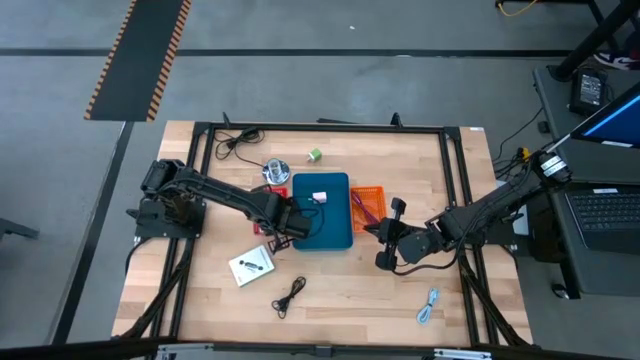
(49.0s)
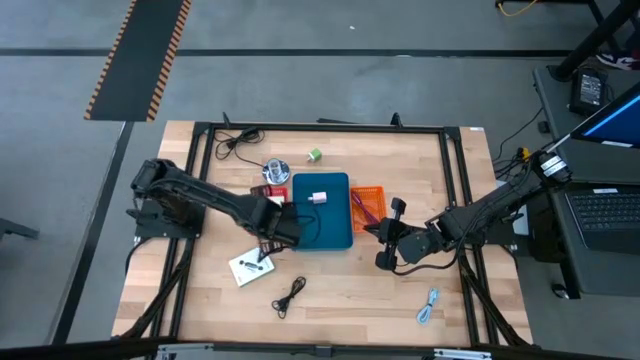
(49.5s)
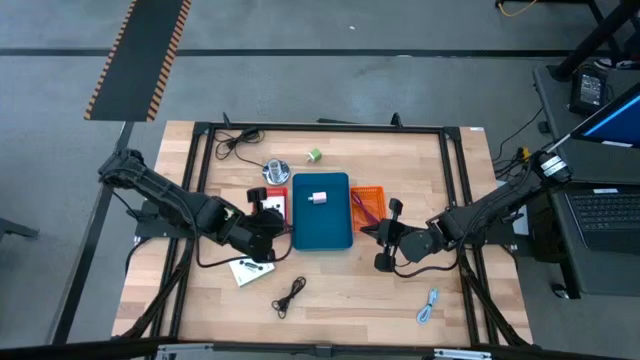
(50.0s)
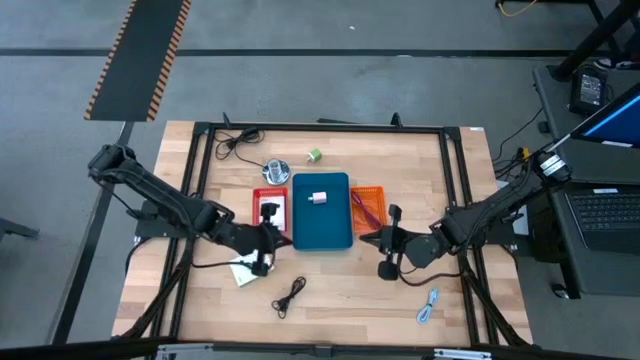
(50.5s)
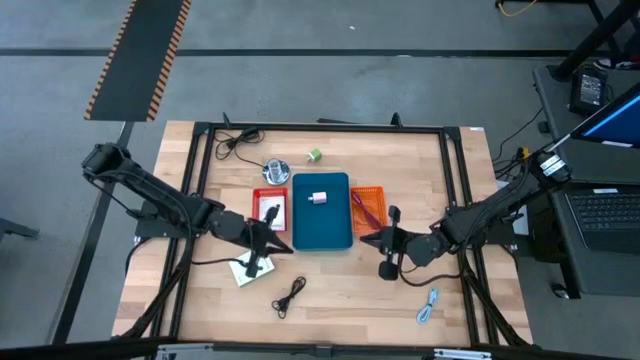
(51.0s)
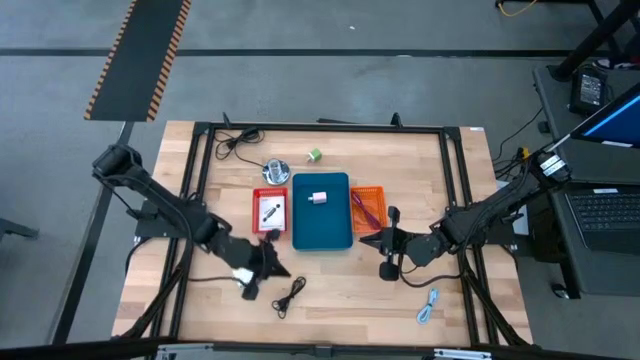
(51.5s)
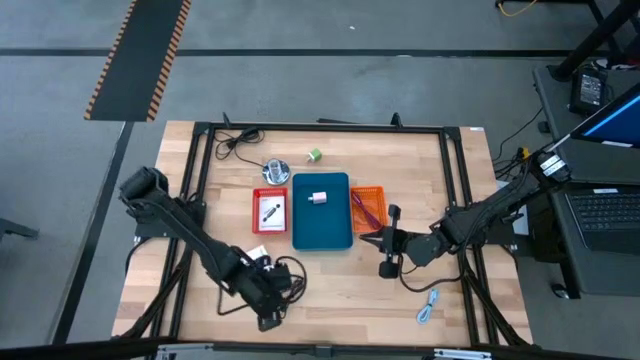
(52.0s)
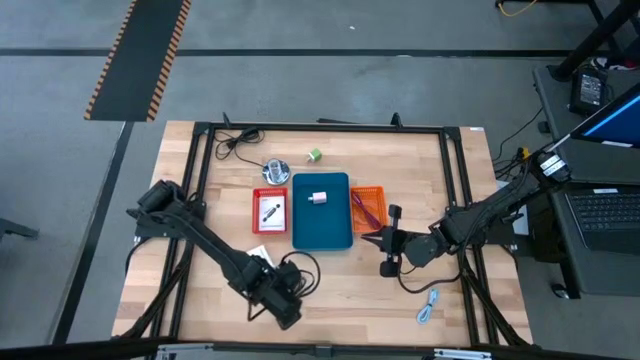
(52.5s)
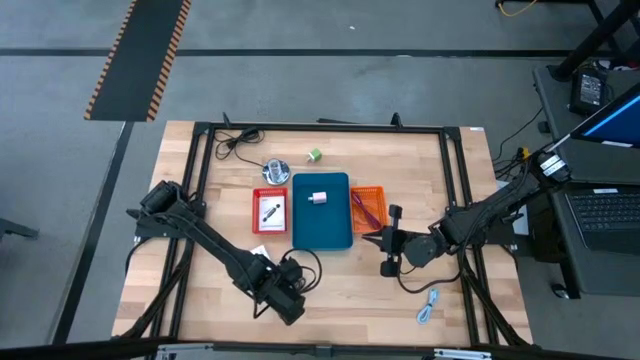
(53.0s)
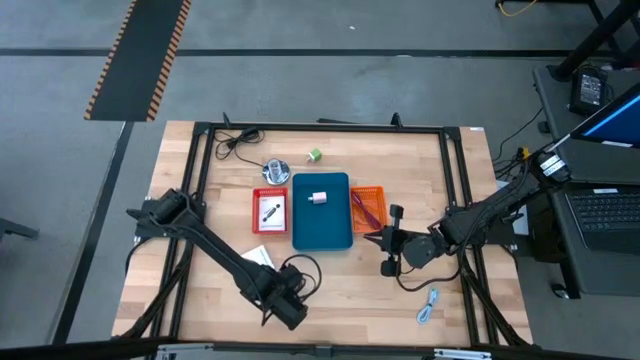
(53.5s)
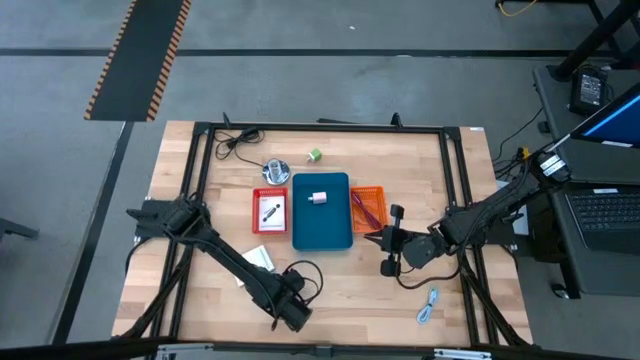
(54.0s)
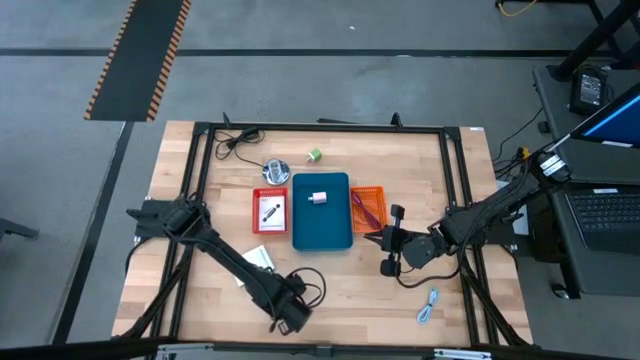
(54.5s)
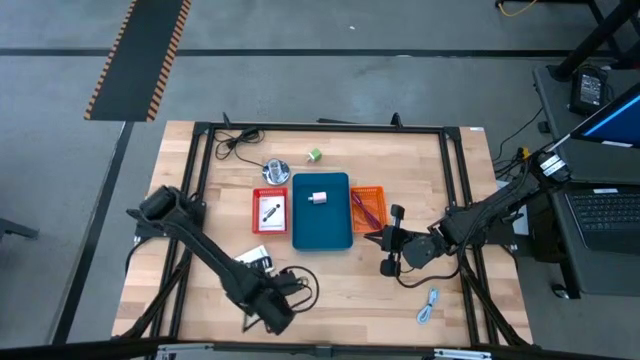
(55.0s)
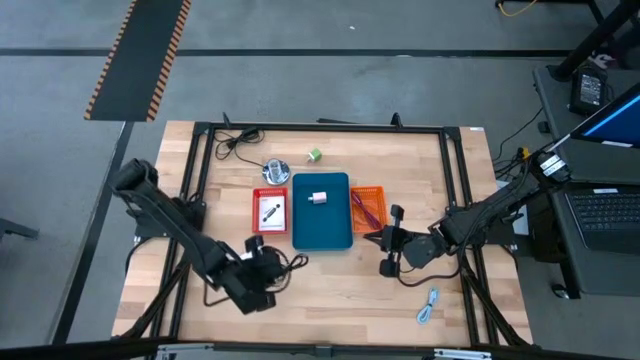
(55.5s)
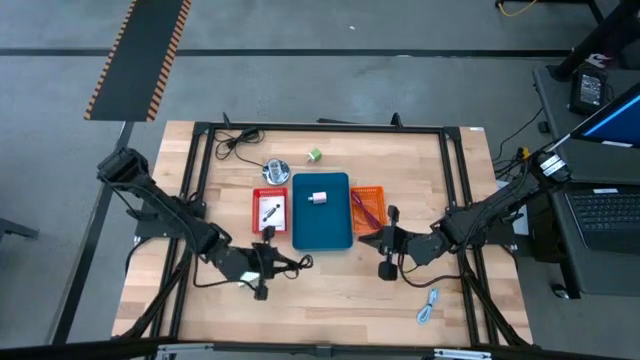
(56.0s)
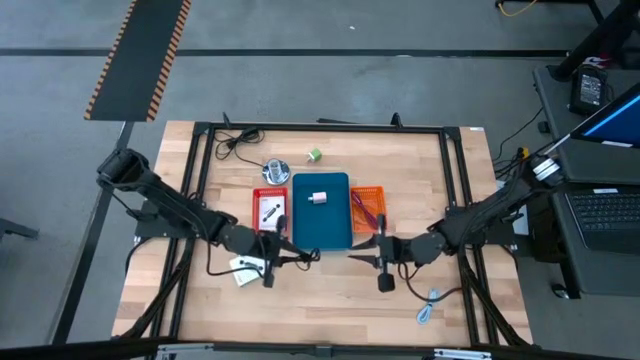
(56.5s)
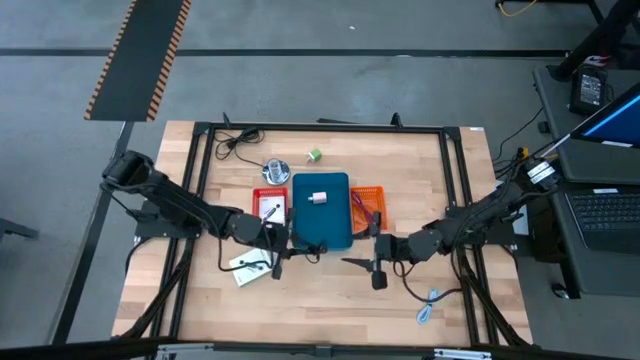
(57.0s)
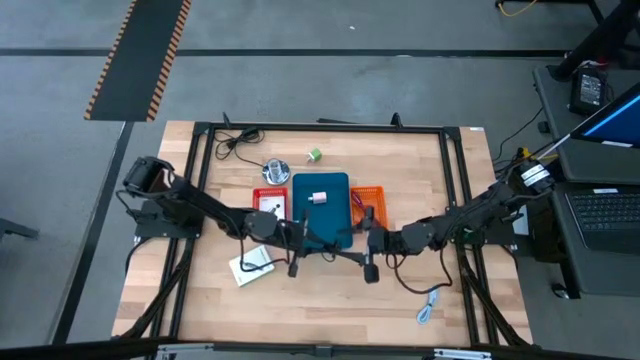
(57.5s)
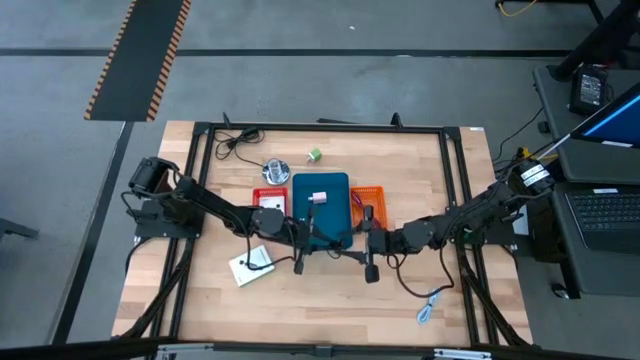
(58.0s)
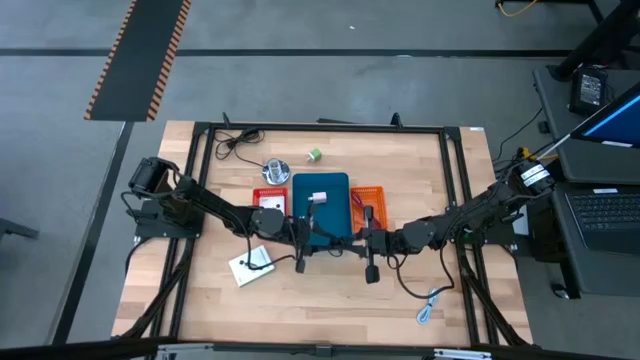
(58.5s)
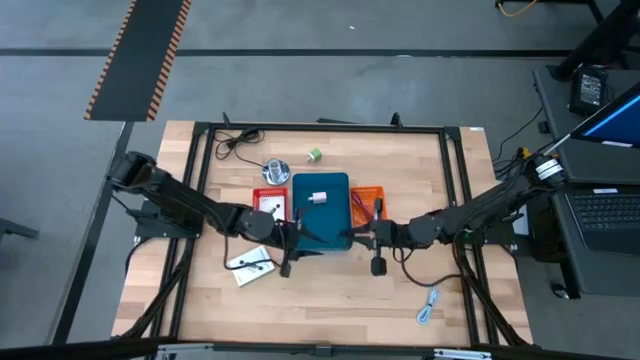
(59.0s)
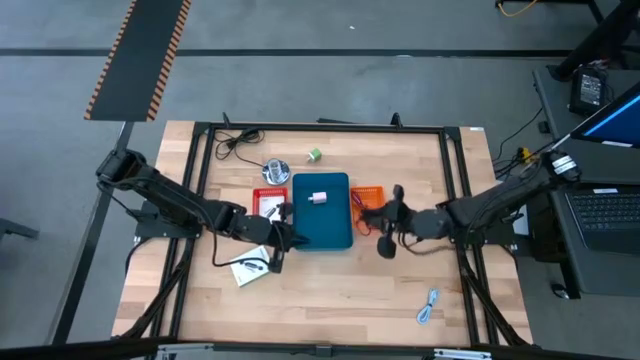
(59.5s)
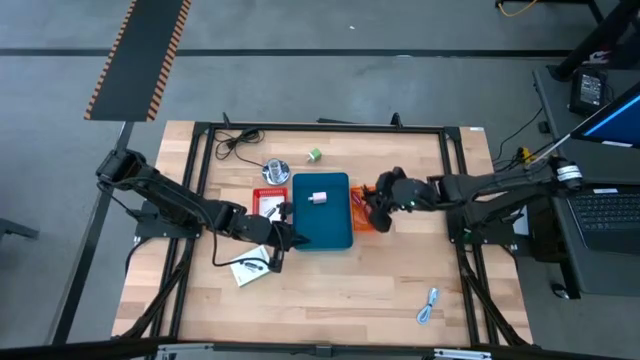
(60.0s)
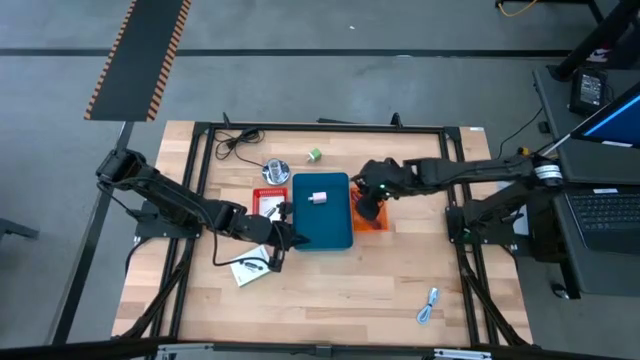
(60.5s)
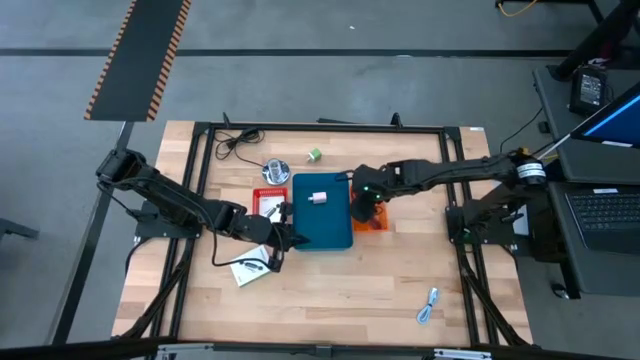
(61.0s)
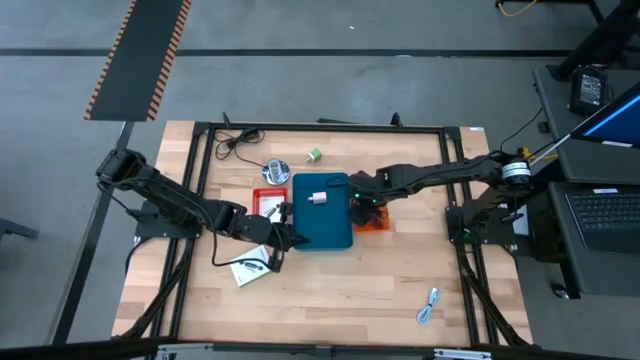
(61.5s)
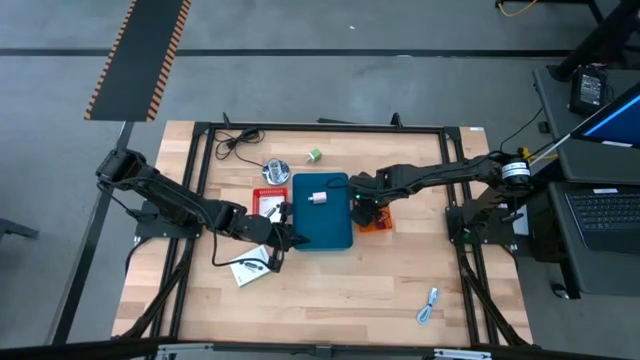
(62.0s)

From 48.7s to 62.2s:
Task: Pick and place items into bin
Put the black USB cable into the orange bin

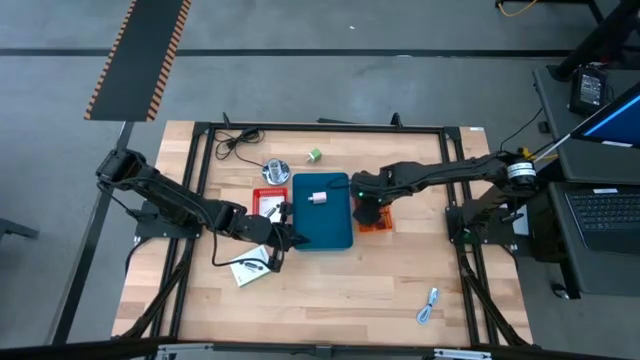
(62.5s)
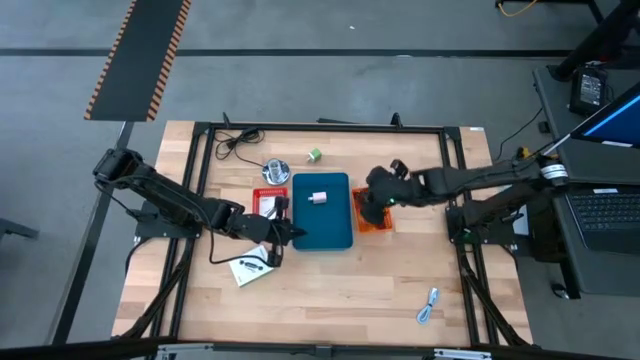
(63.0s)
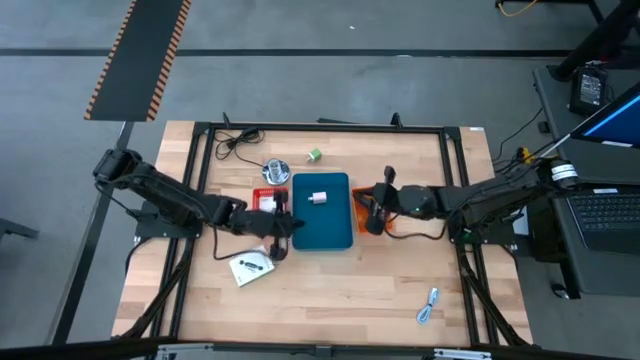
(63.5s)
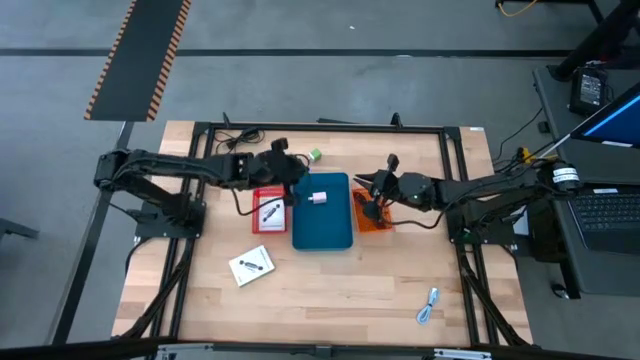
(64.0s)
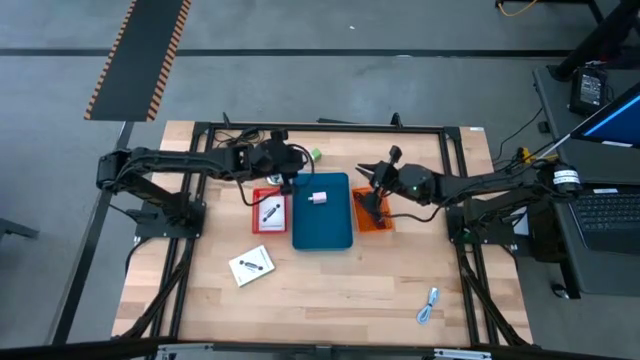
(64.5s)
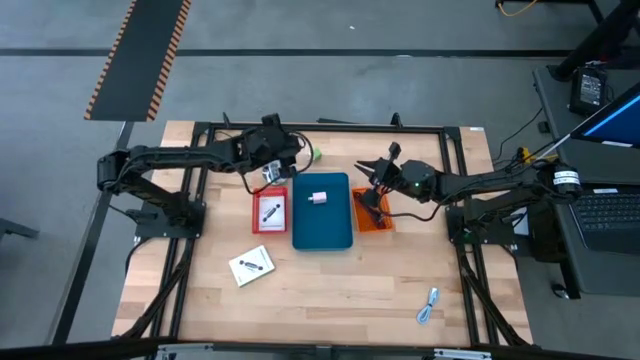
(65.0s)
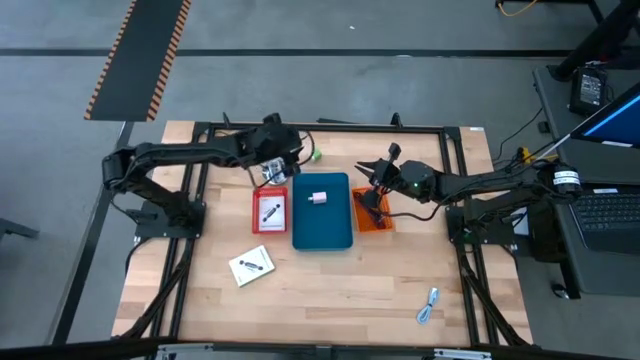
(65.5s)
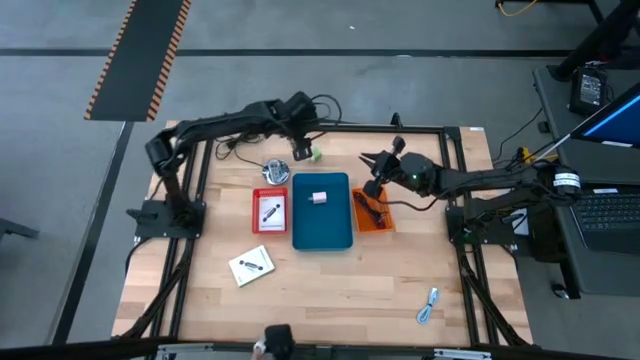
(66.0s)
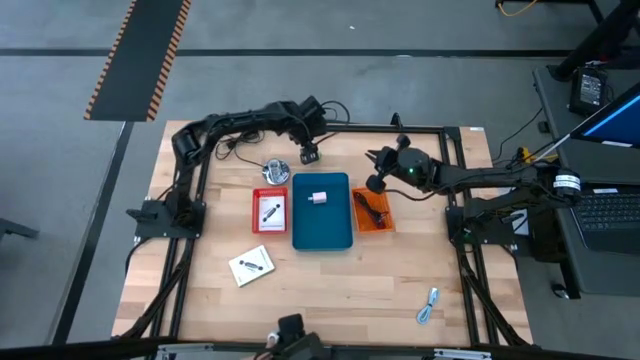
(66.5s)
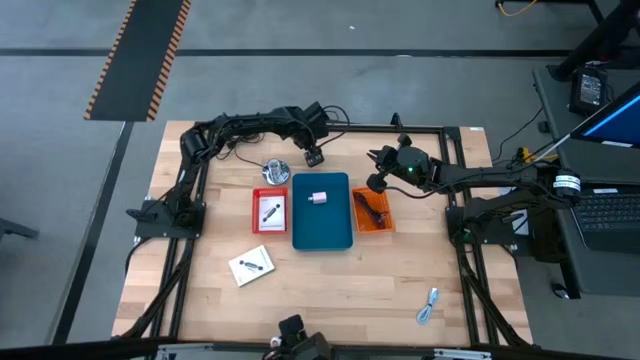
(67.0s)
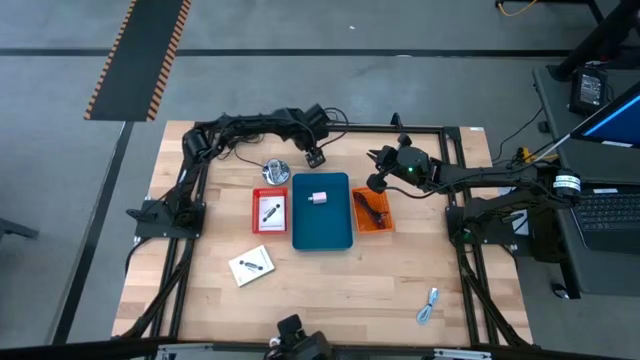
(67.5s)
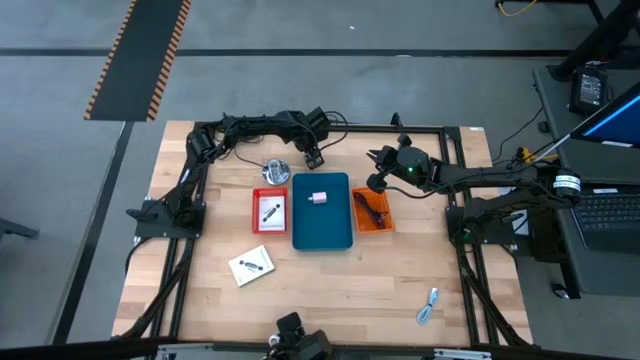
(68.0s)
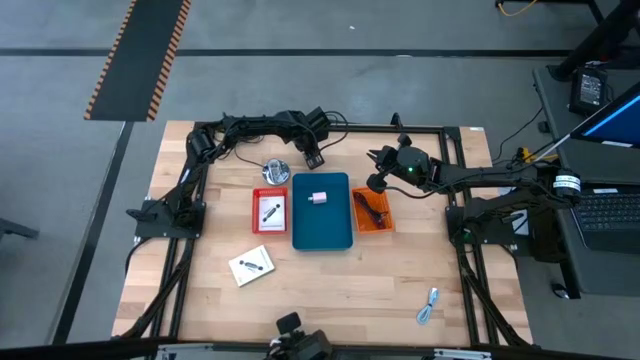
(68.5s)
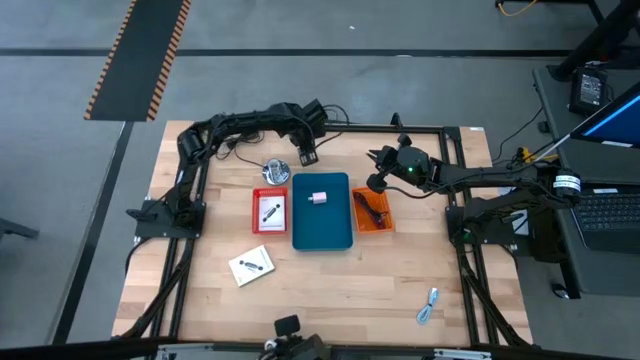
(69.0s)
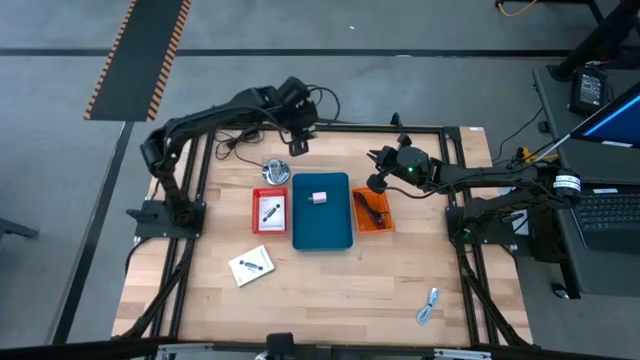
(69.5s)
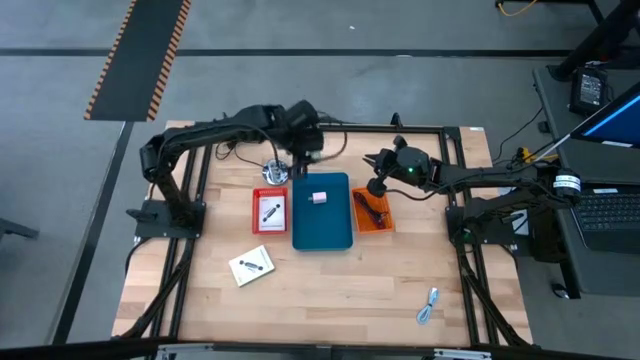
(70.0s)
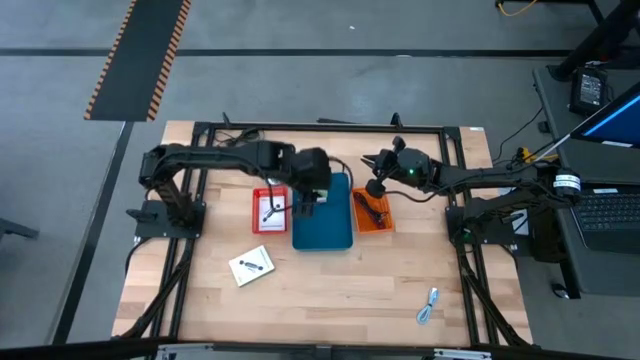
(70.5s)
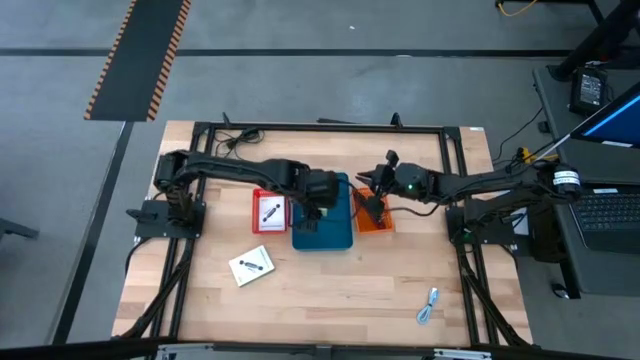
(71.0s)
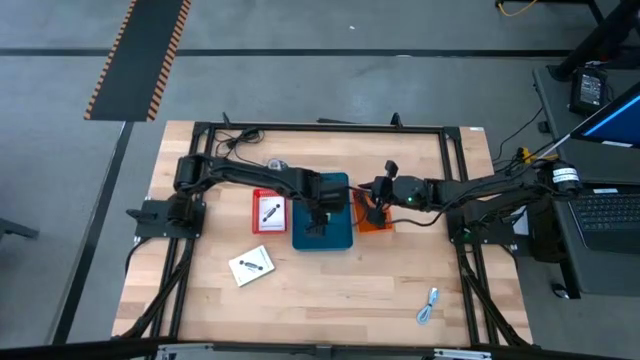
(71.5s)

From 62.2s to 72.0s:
Put the green charger adapter into the blue bin
